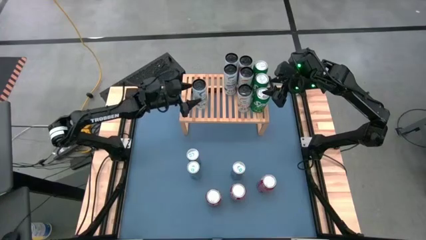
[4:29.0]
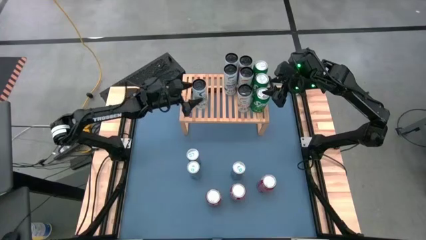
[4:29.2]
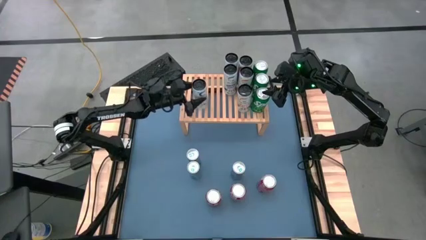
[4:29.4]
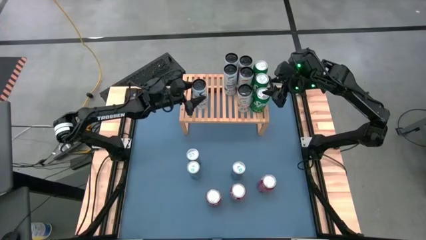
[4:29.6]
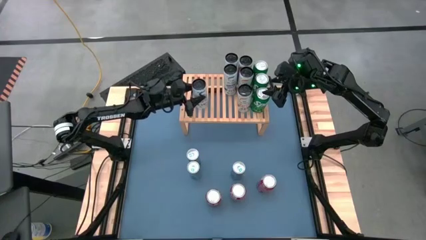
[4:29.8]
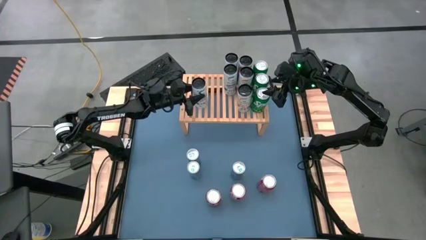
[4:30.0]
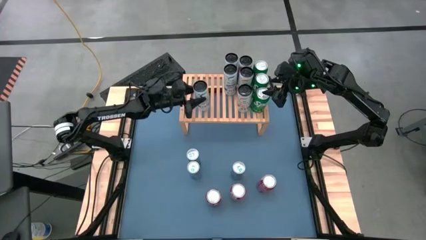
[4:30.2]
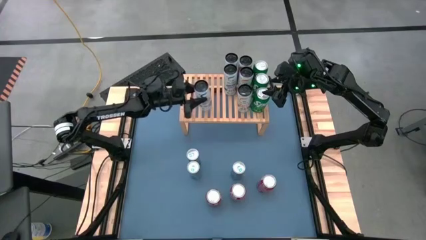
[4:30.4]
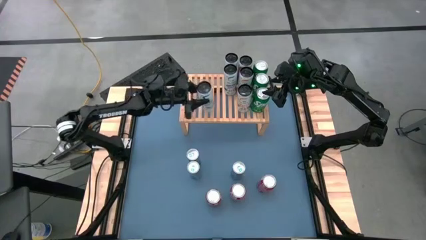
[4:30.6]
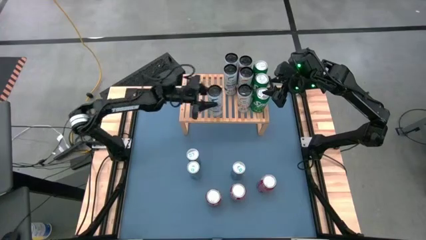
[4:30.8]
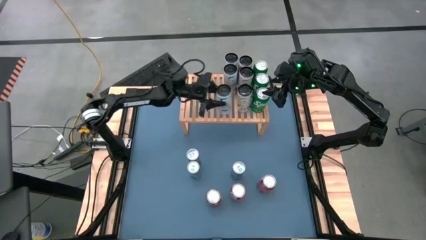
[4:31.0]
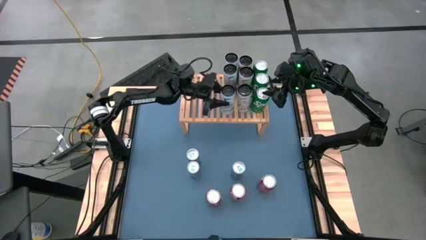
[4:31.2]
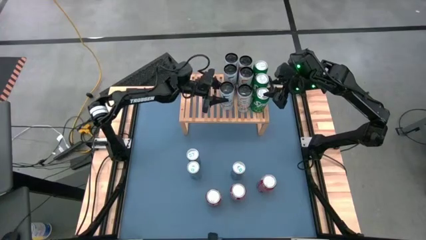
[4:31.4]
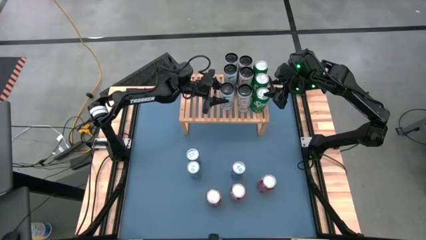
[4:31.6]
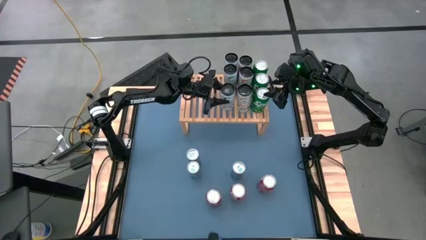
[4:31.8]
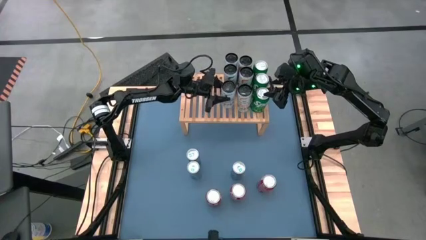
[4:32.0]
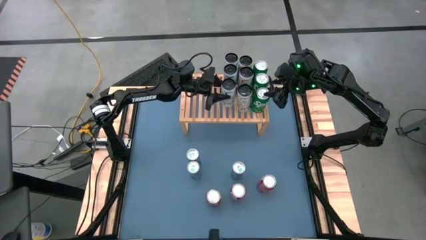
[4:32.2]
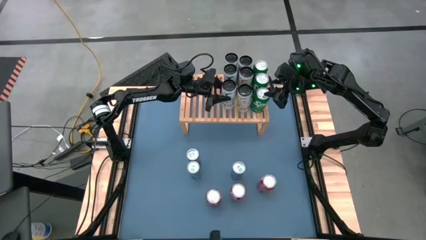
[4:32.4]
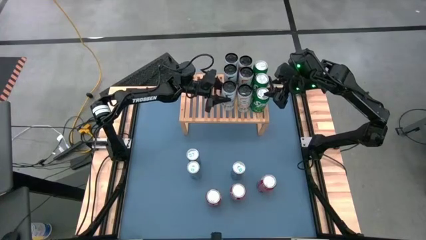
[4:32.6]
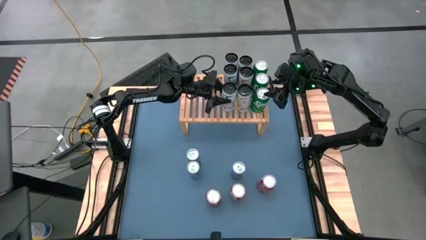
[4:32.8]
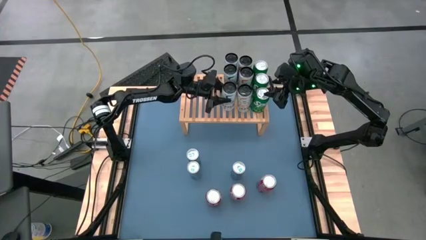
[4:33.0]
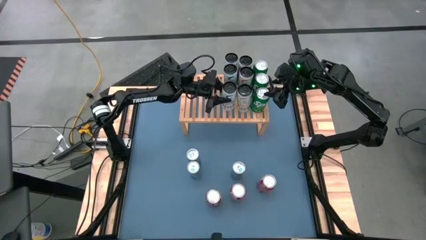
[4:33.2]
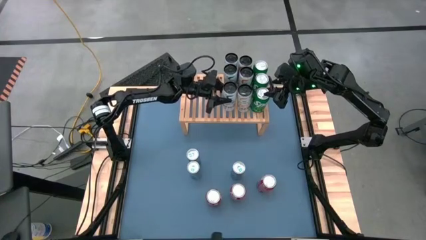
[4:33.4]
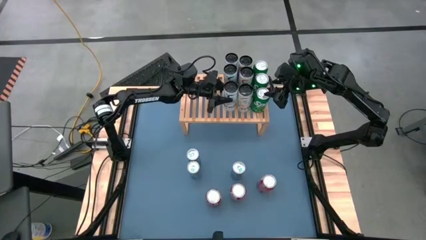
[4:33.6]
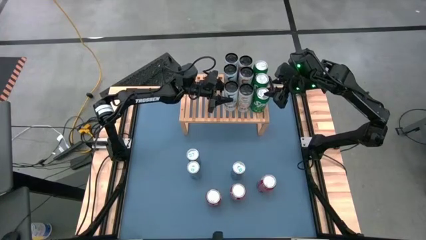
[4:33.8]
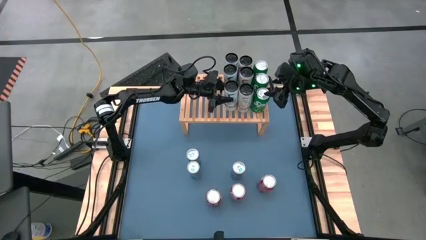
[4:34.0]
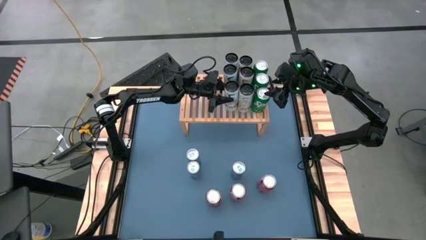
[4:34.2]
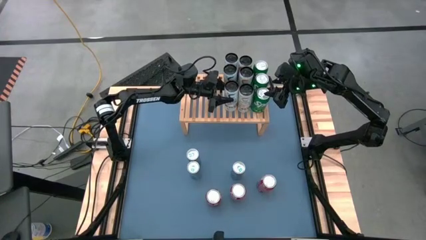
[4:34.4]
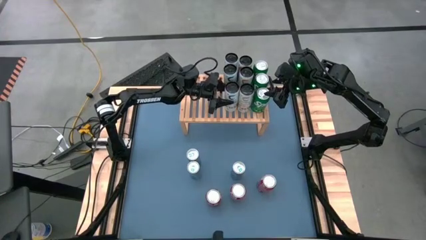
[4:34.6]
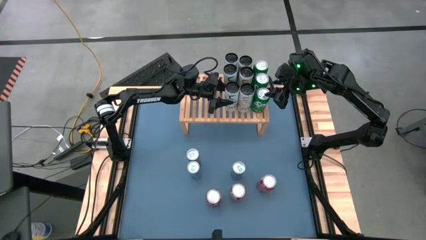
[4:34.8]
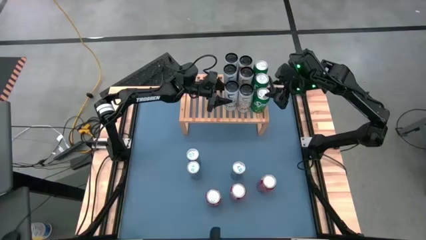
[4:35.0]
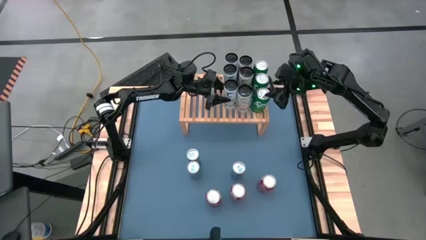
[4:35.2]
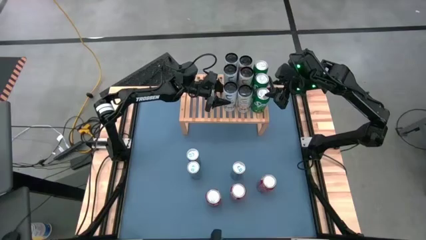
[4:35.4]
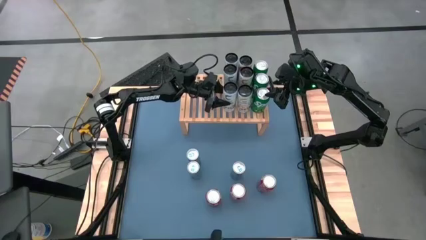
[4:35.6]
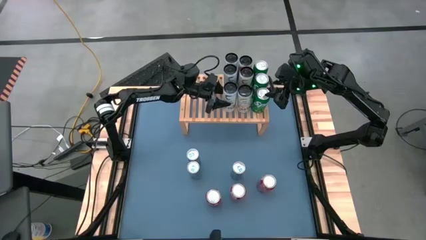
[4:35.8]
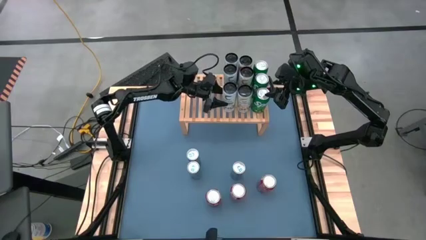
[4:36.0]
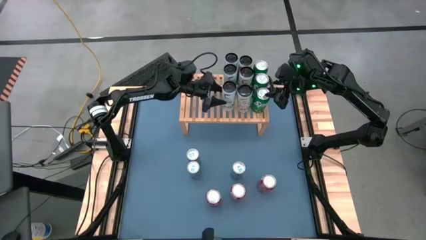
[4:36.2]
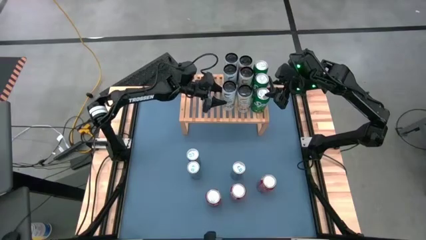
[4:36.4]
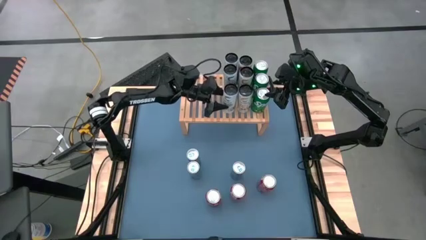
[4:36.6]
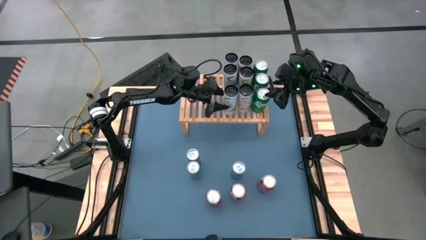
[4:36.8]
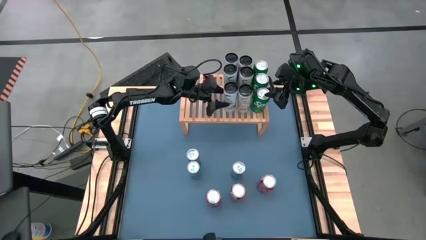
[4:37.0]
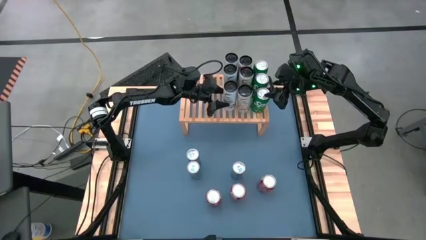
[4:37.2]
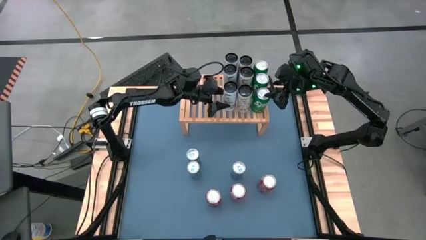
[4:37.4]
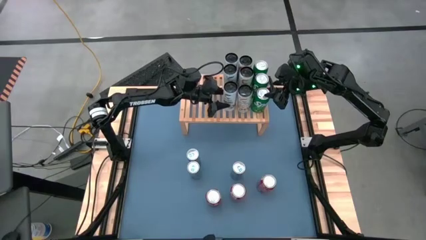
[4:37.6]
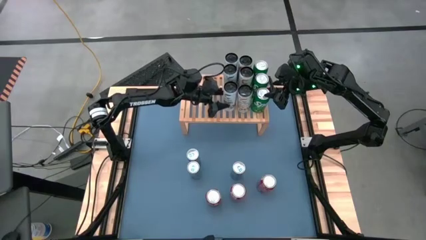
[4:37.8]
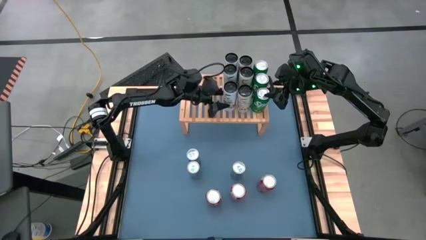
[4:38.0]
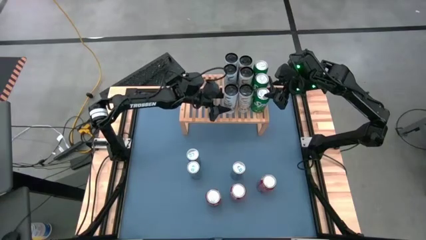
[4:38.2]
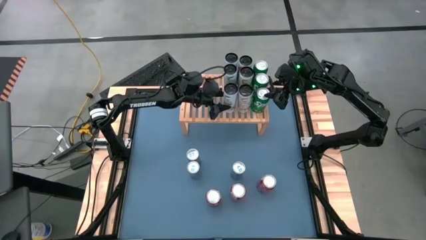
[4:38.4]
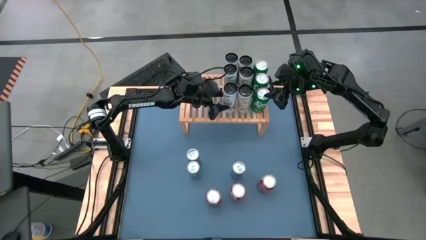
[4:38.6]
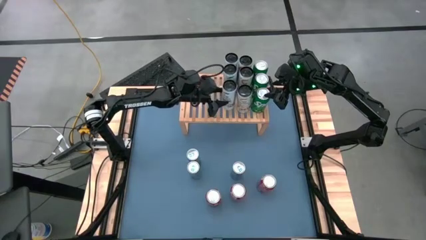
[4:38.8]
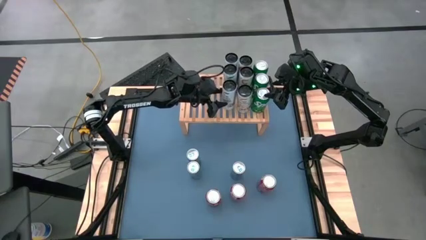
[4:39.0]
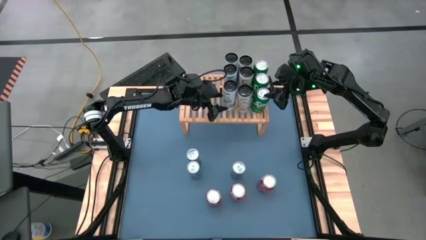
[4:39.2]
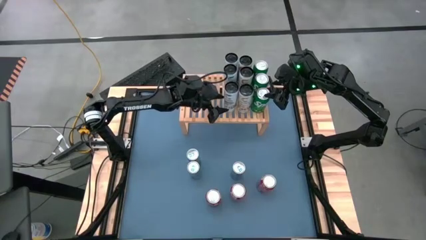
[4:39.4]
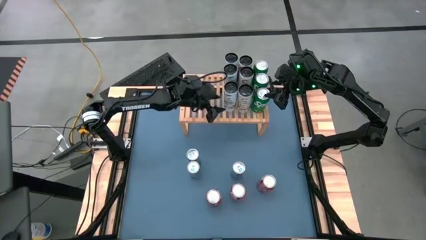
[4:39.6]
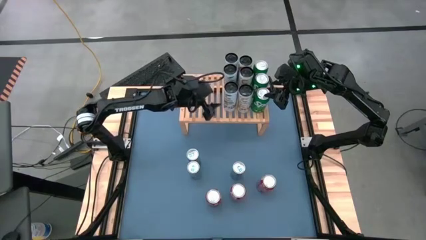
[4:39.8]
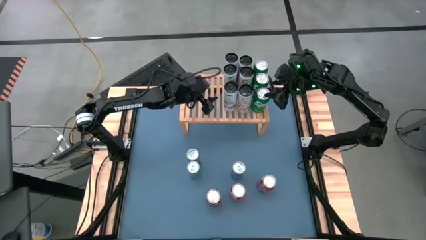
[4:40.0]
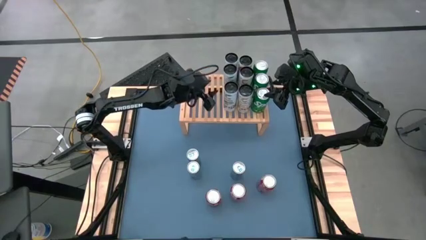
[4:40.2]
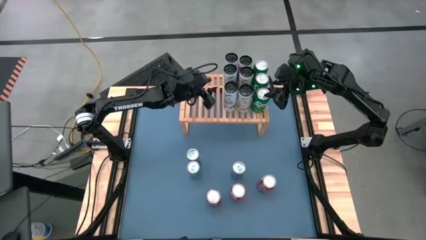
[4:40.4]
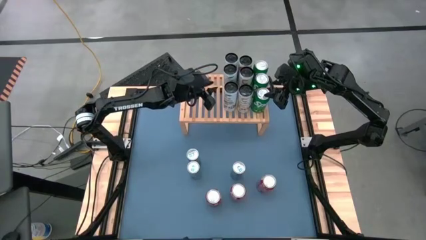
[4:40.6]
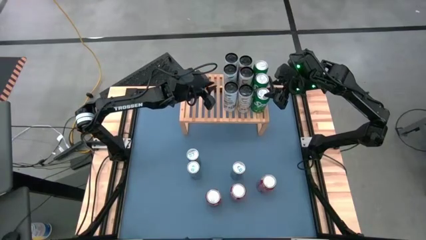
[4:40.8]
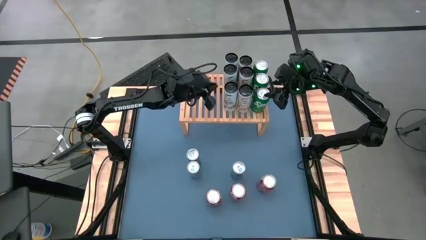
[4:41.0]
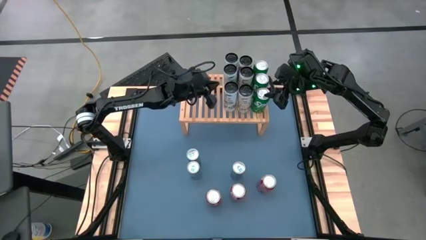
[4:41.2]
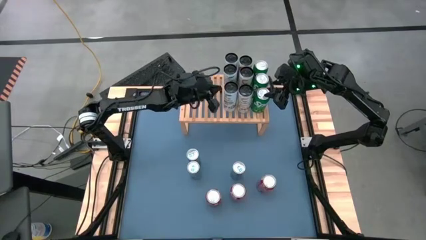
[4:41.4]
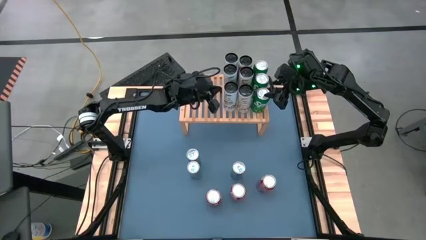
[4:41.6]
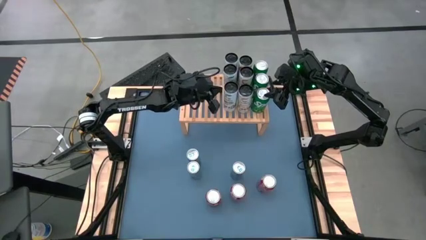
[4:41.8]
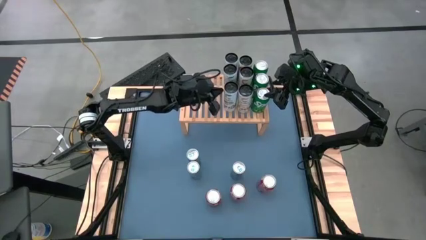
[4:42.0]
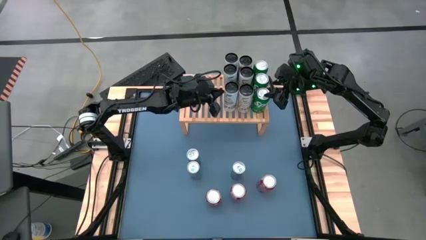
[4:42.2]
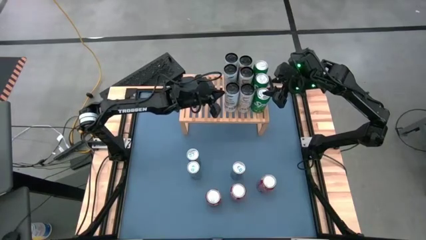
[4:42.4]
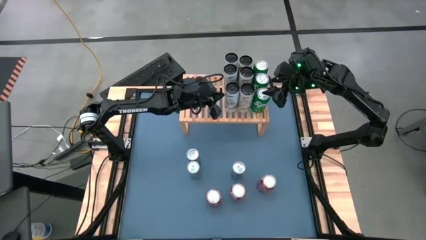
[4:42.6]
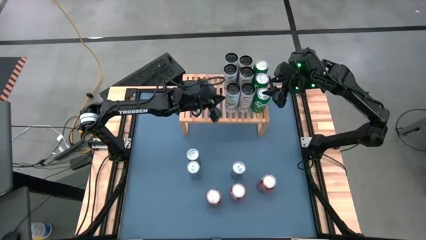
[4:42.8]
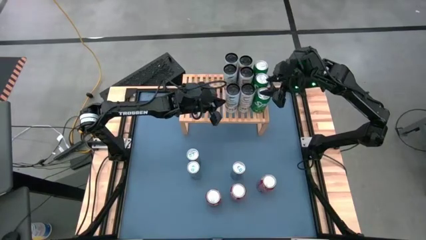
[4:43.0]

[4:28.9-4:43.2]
Task: Place canned beverage on shelf
Put the white-blue soda can on the shelf aligned with the other white-blue soda can
